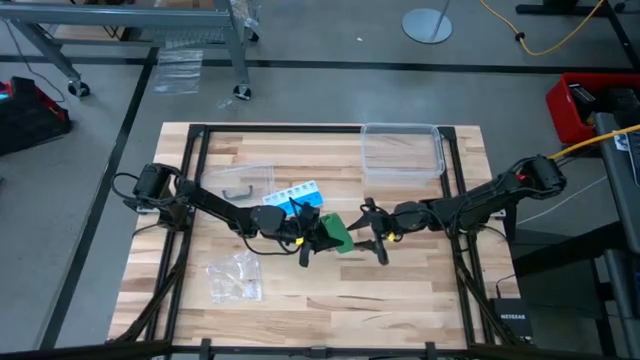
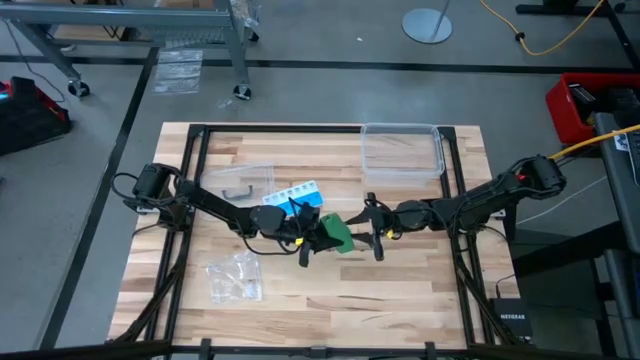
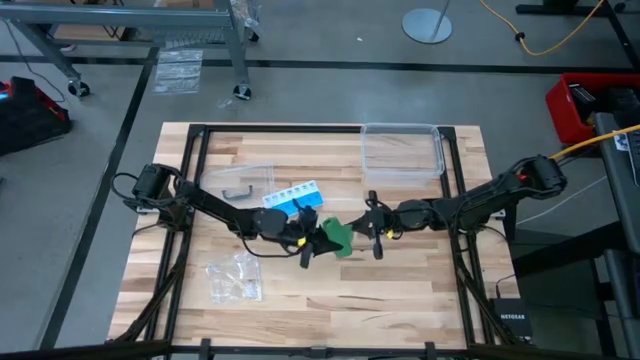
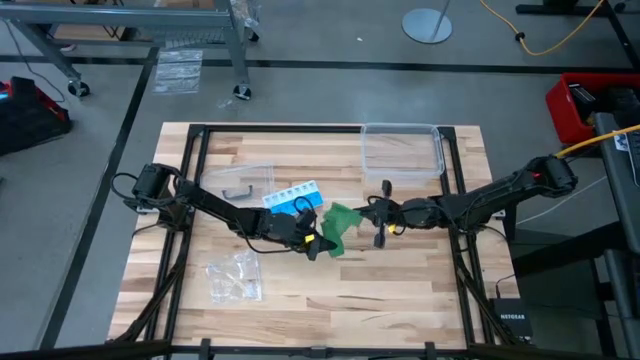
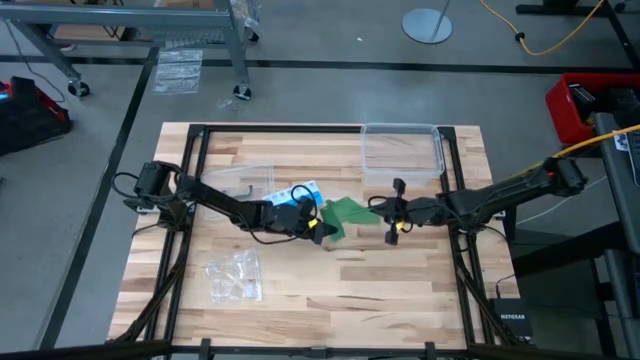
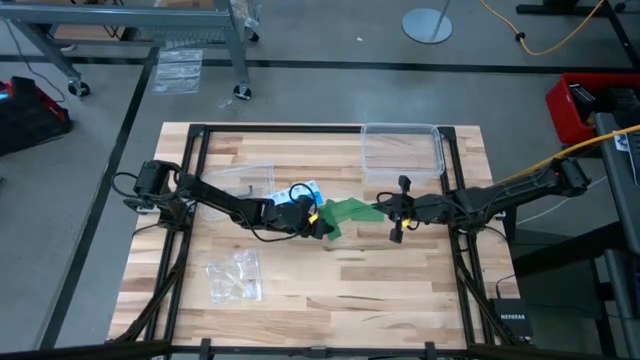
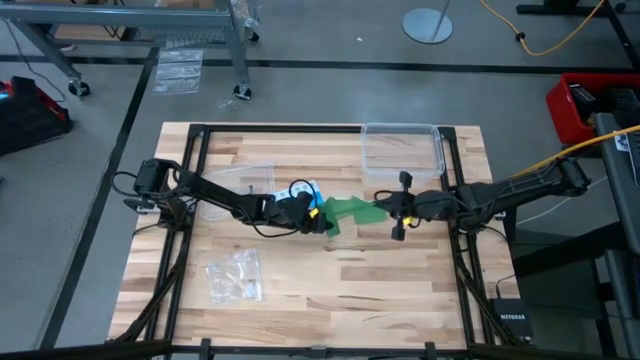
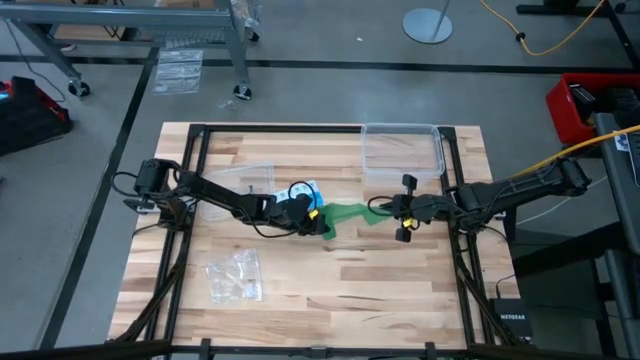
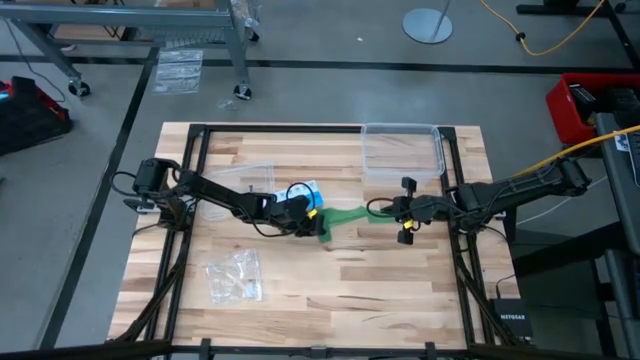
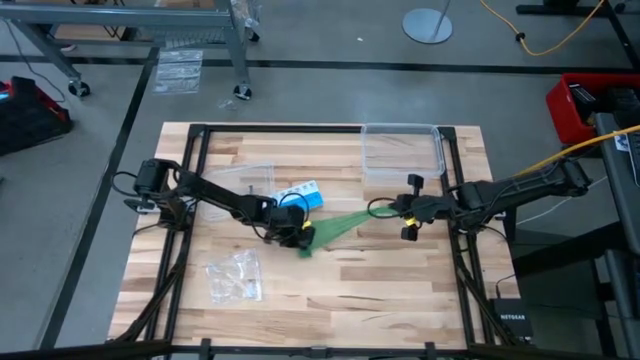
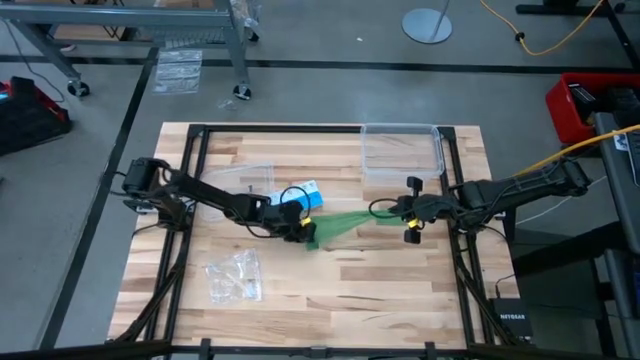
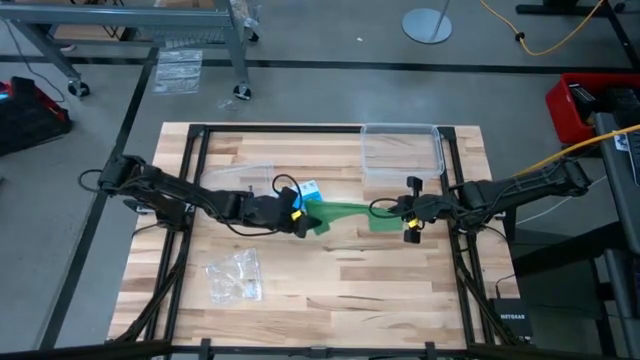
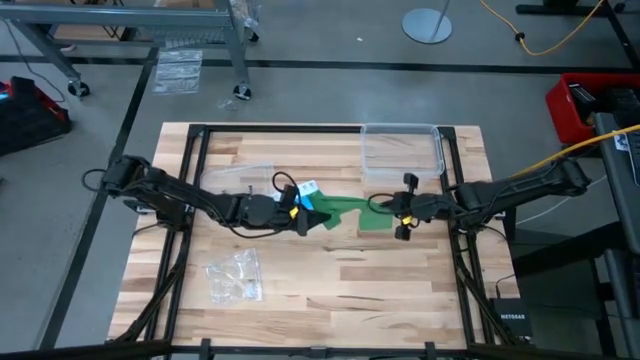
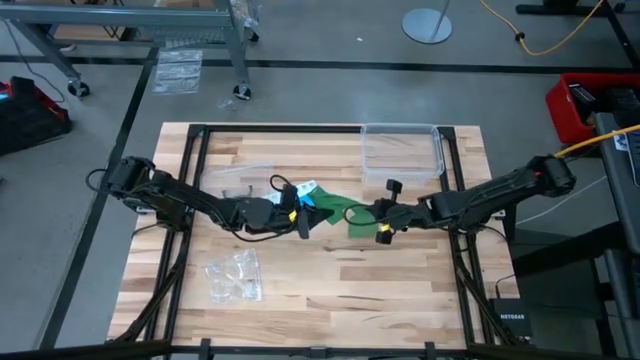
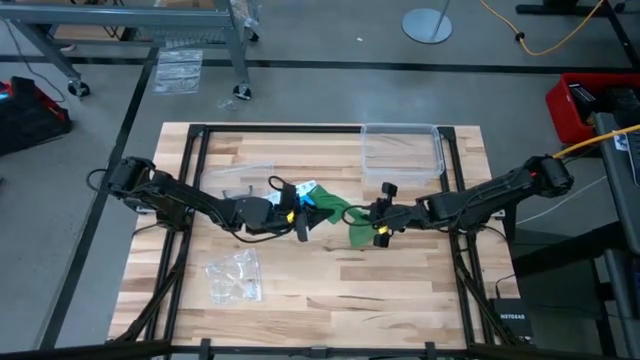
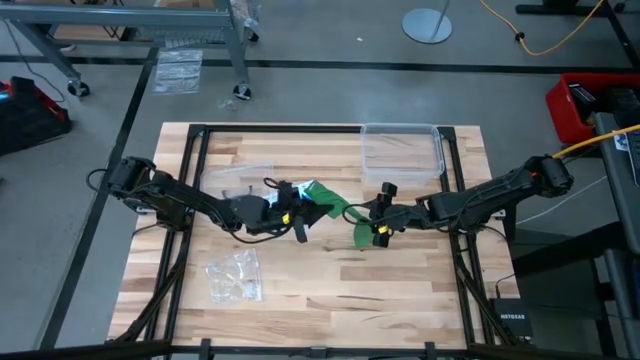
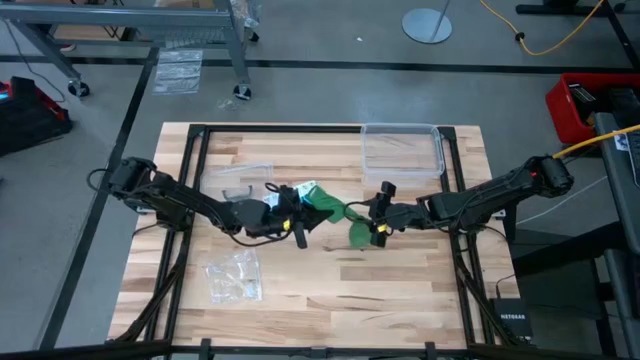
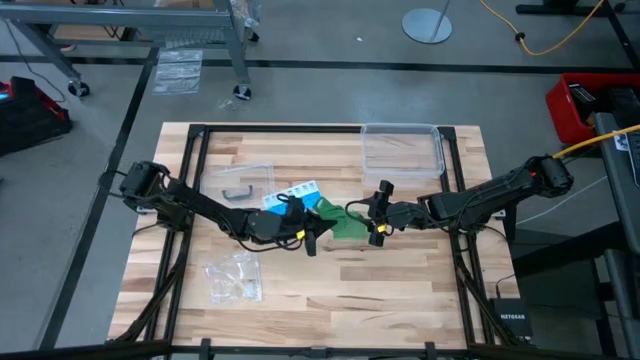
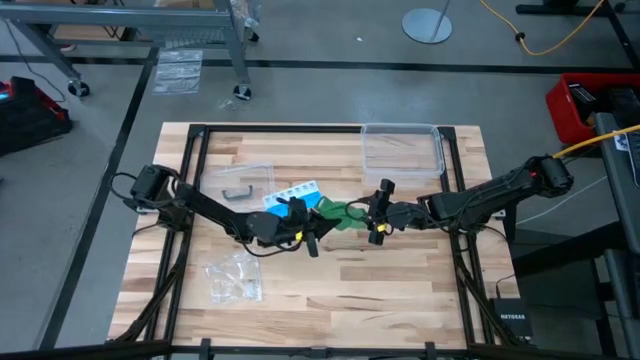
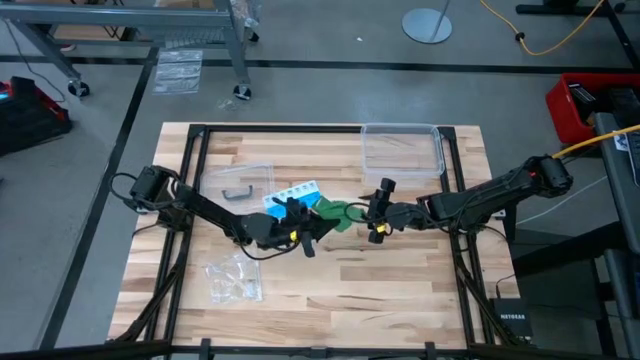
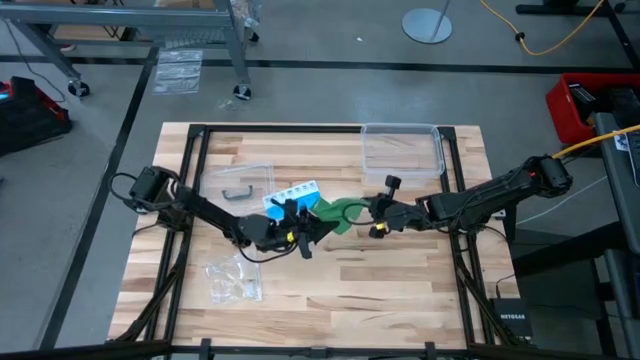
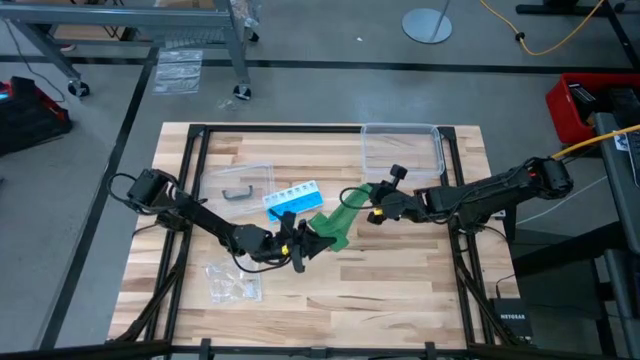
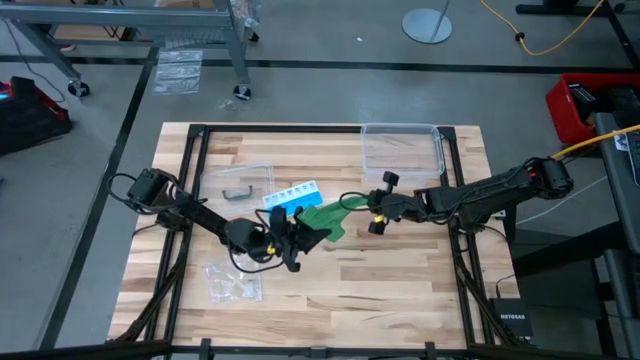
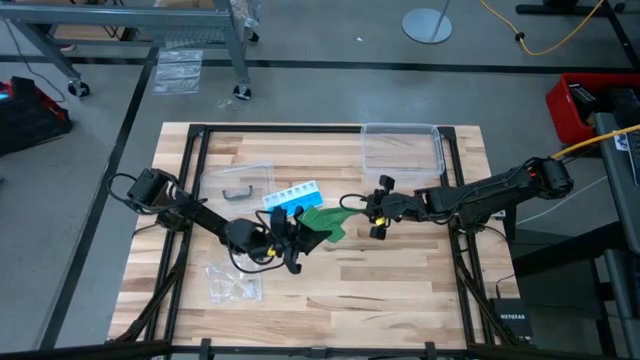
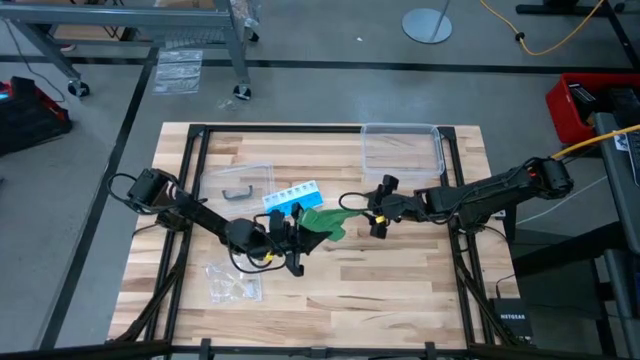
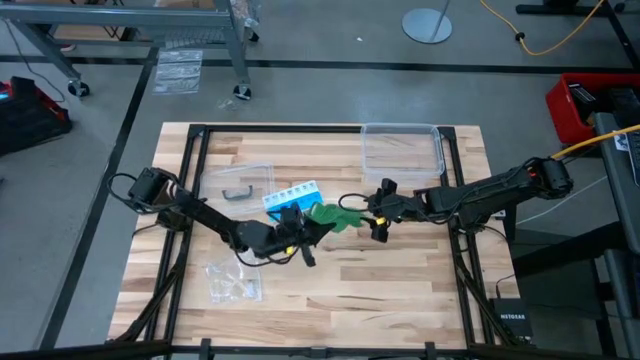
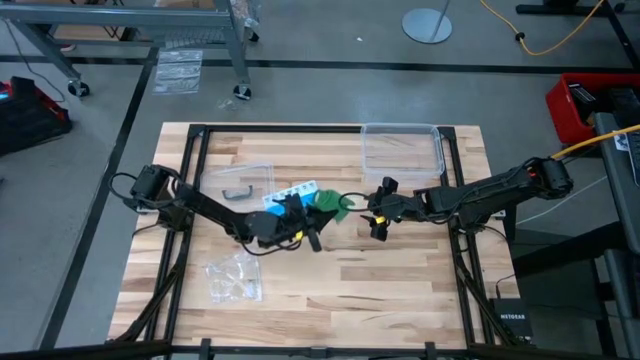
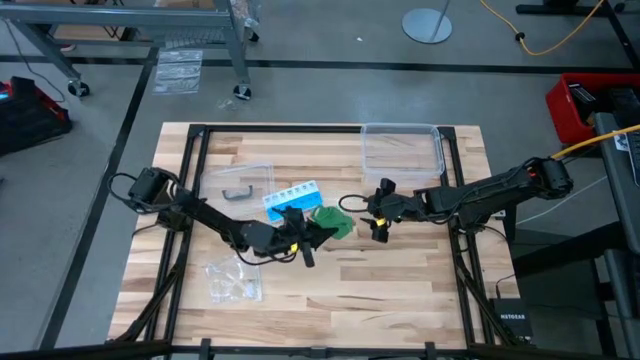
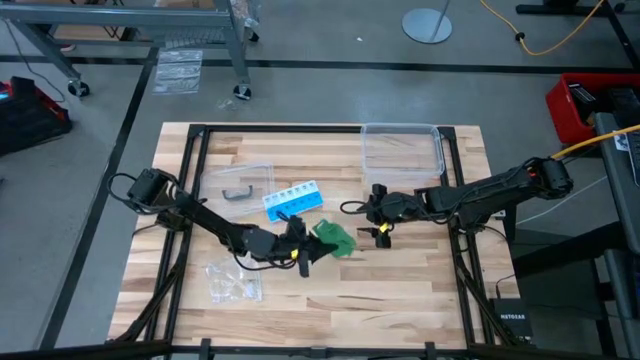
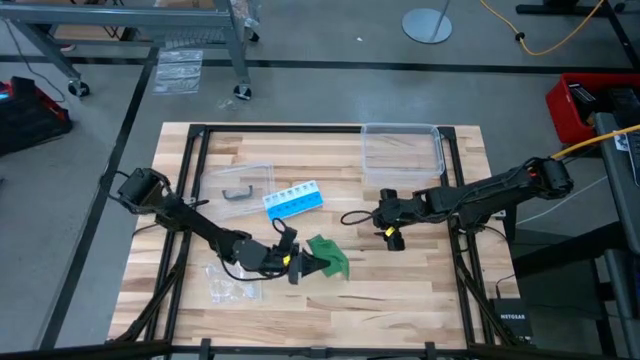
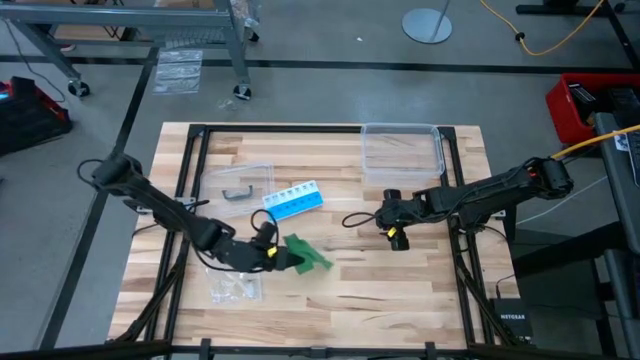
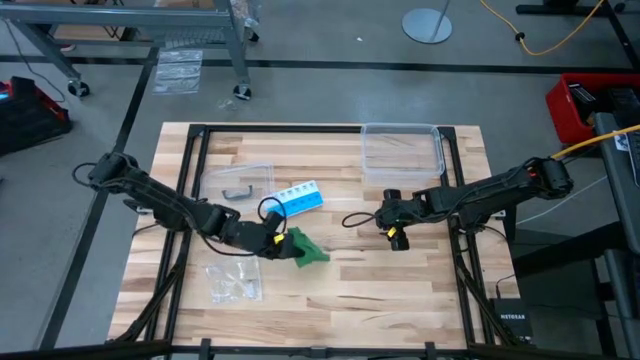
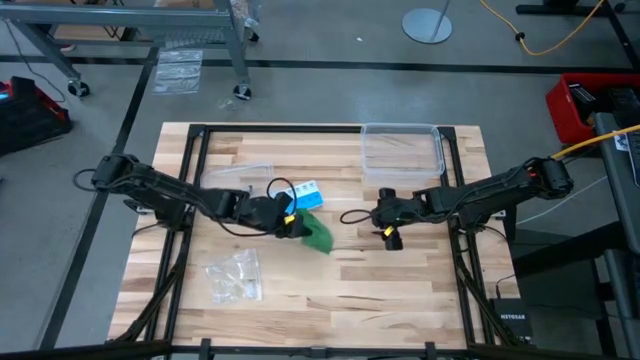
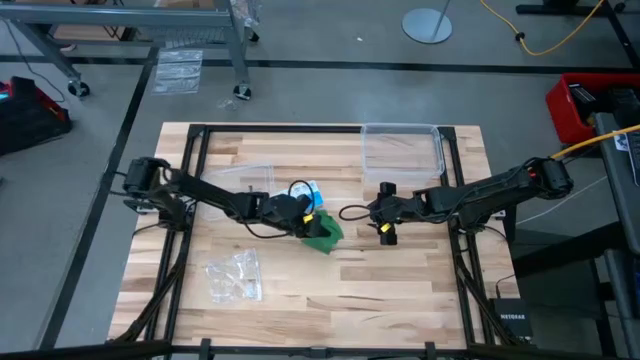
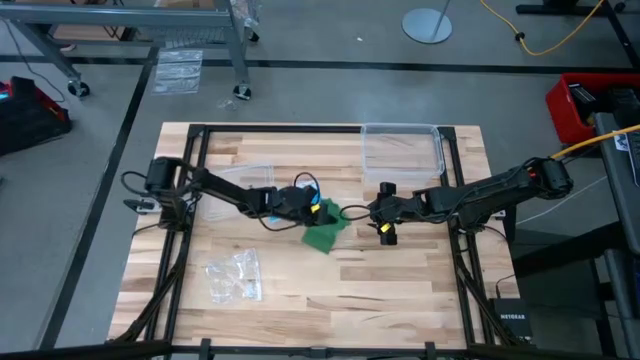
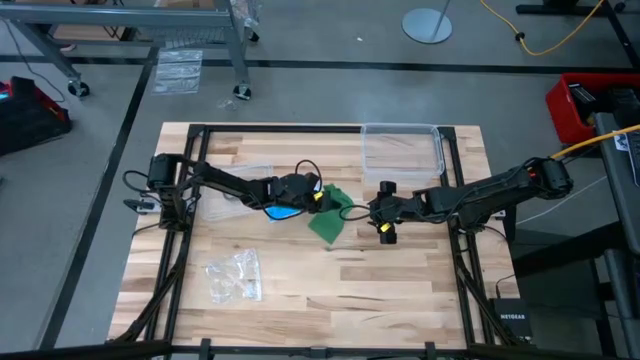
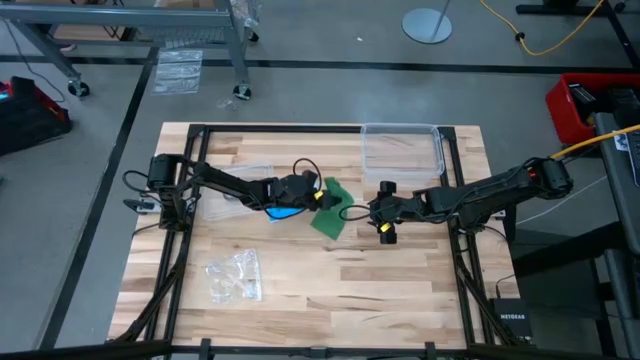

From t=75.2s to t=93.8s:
Task: Roll bandage
Roll the green bandage

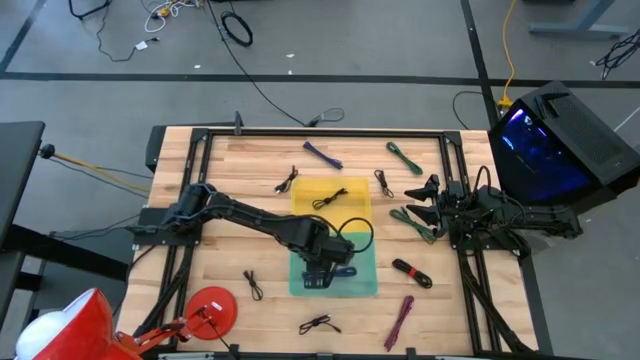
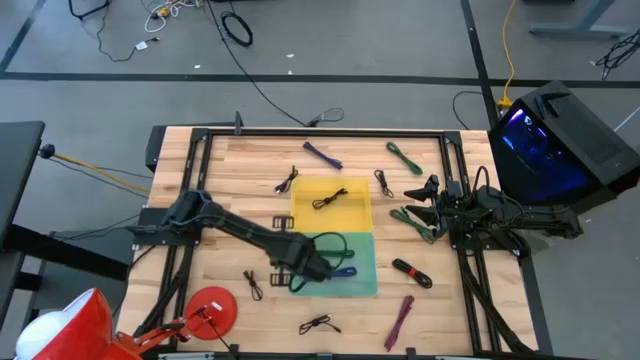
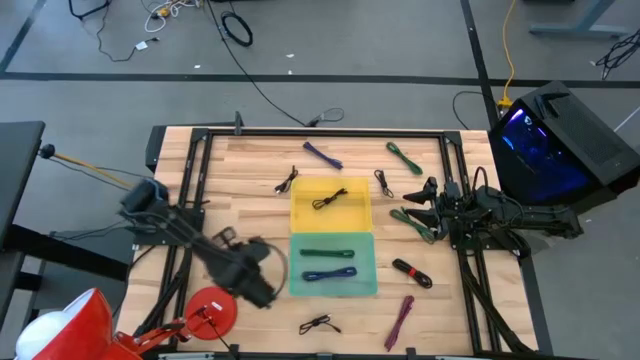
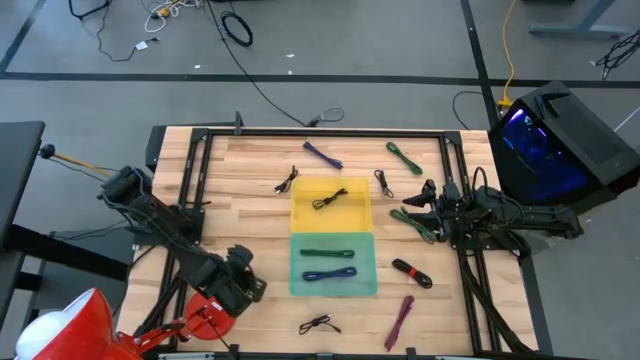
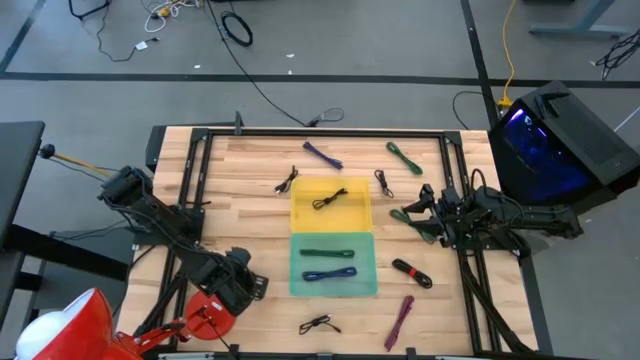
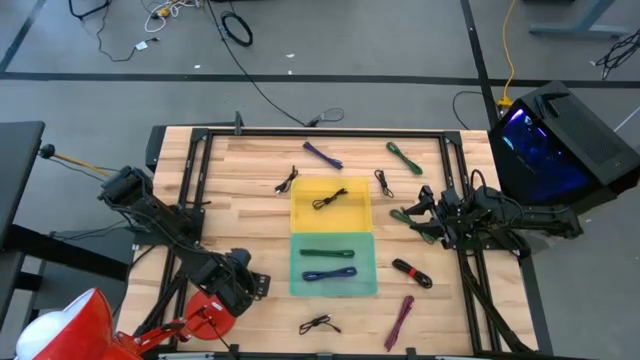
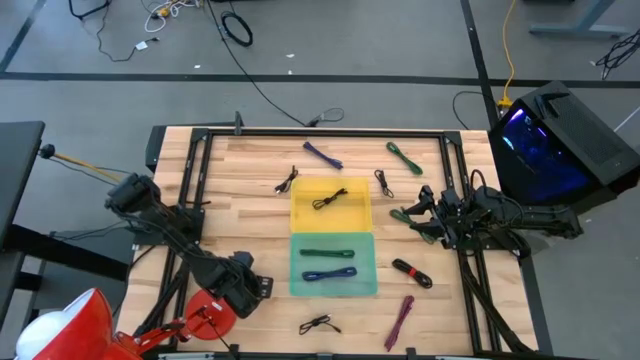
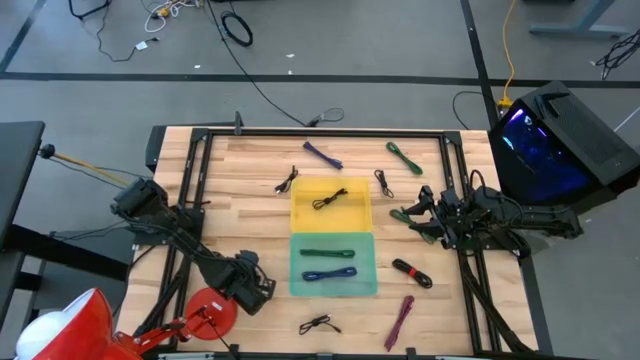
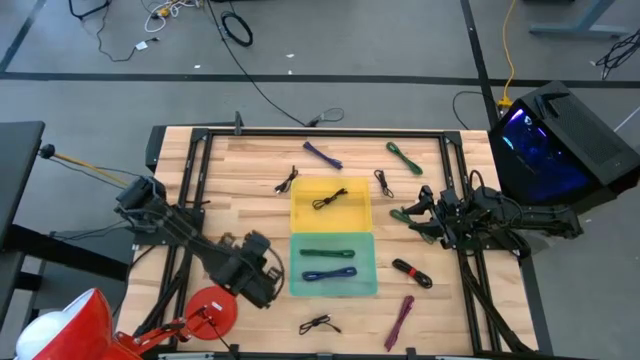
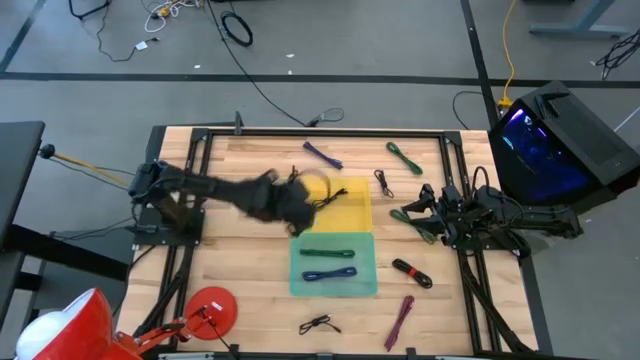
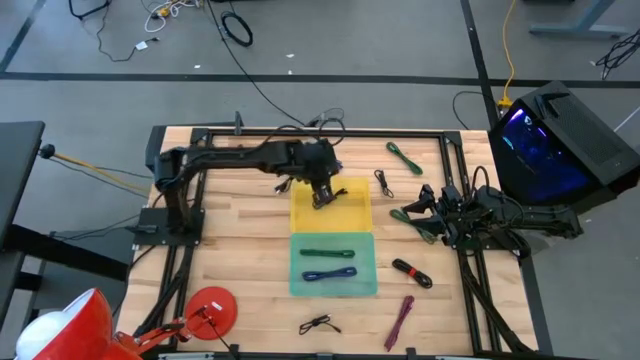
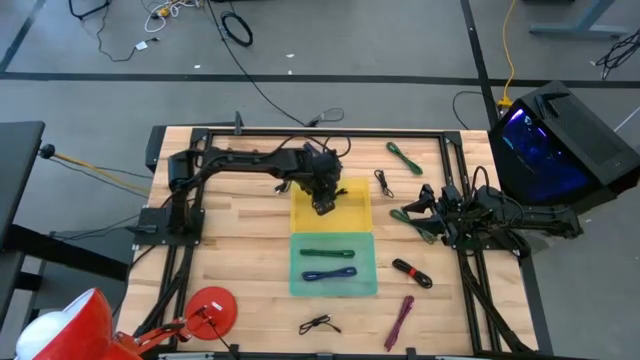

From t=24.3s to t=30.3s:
Task: Pick & Place USB Port
Put the black charger cable into the yellow bin
